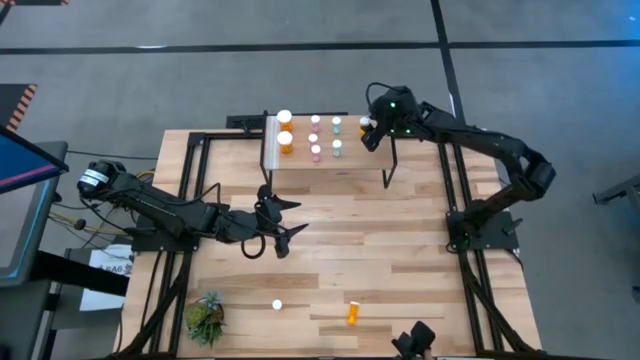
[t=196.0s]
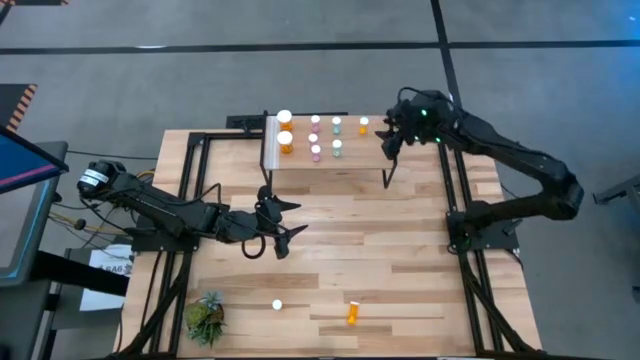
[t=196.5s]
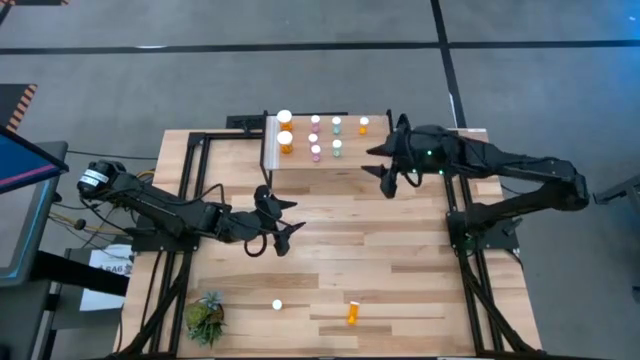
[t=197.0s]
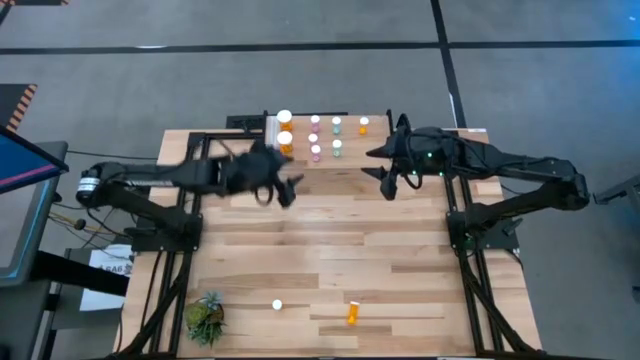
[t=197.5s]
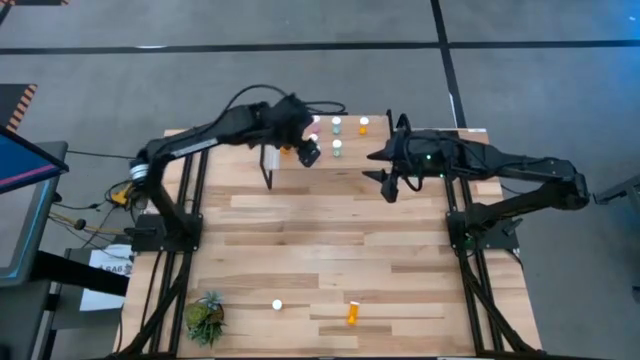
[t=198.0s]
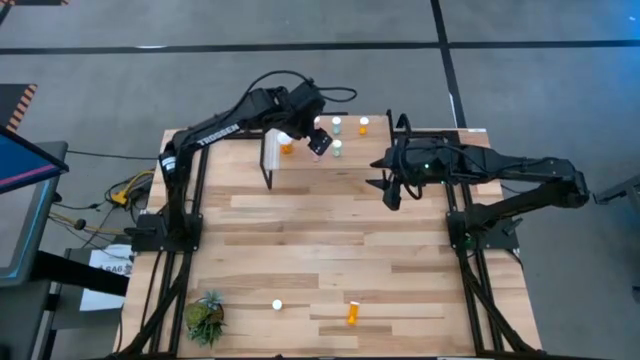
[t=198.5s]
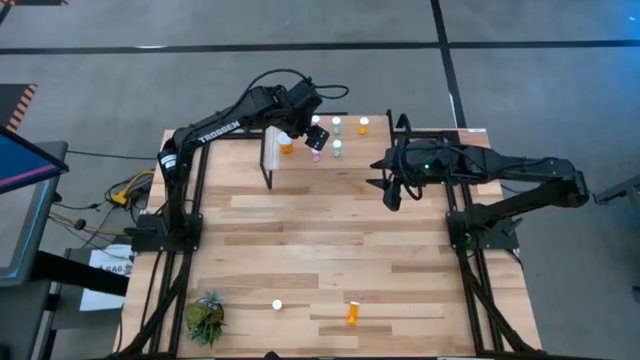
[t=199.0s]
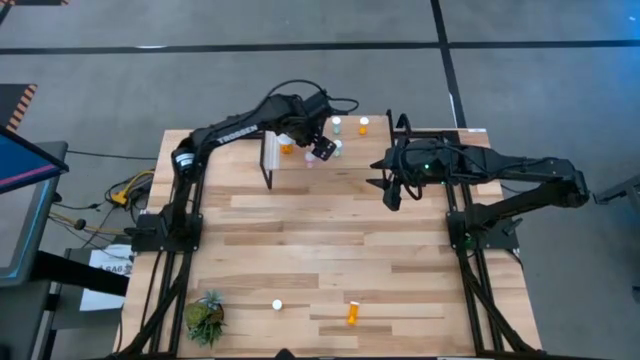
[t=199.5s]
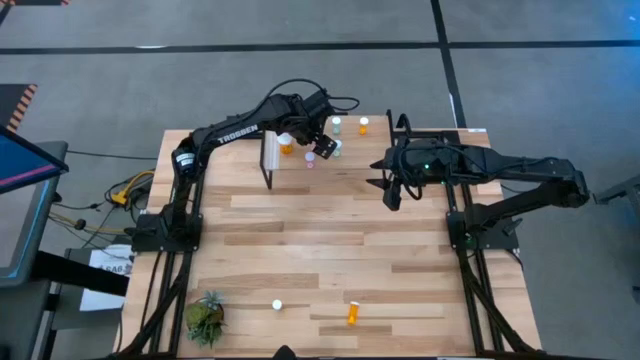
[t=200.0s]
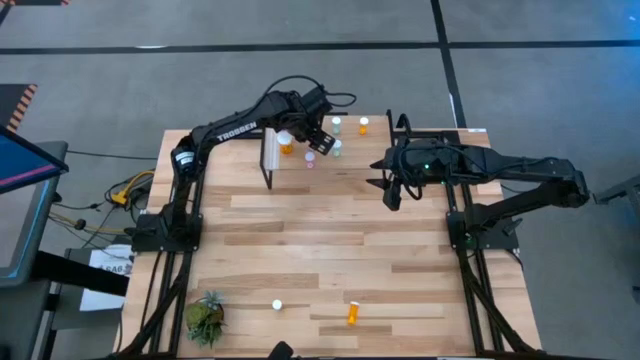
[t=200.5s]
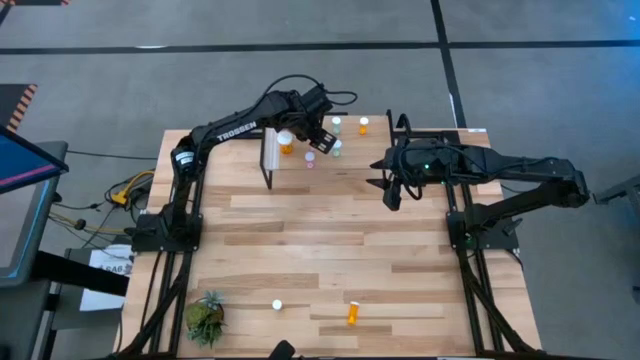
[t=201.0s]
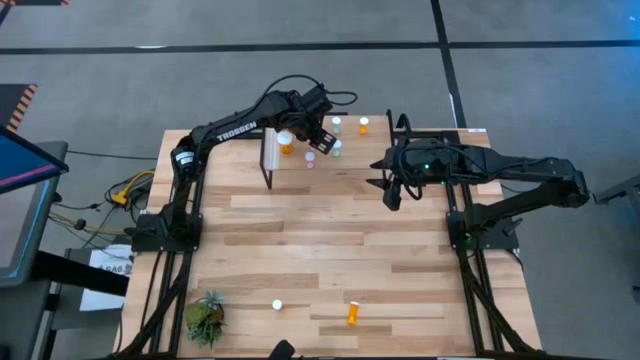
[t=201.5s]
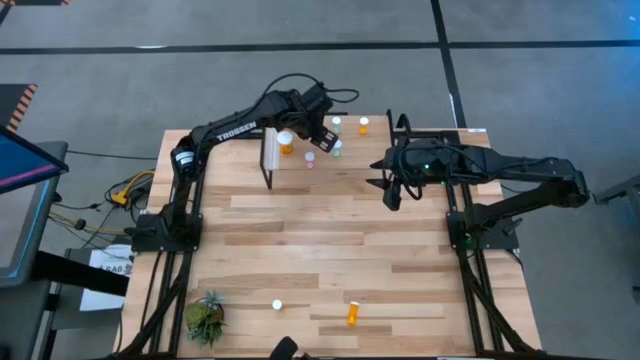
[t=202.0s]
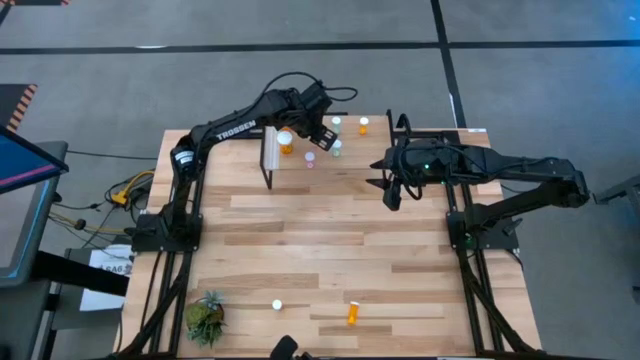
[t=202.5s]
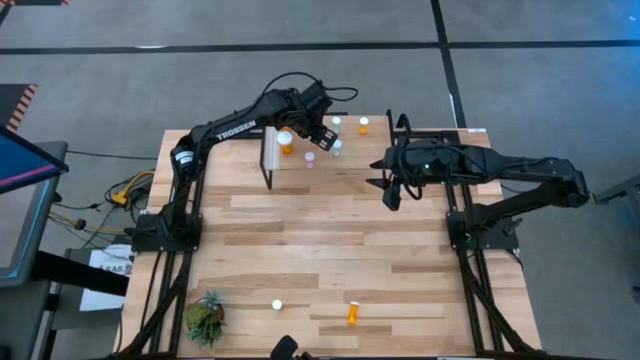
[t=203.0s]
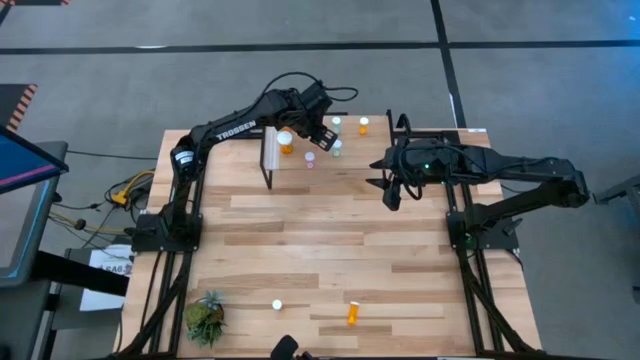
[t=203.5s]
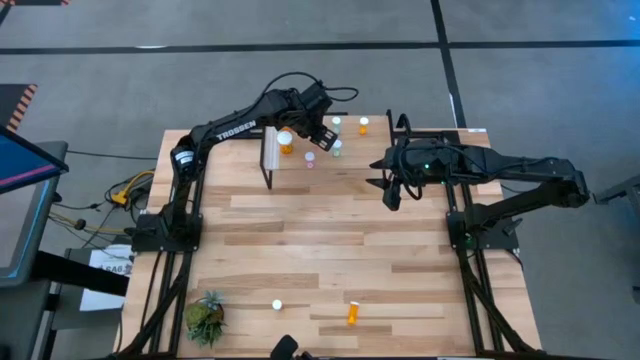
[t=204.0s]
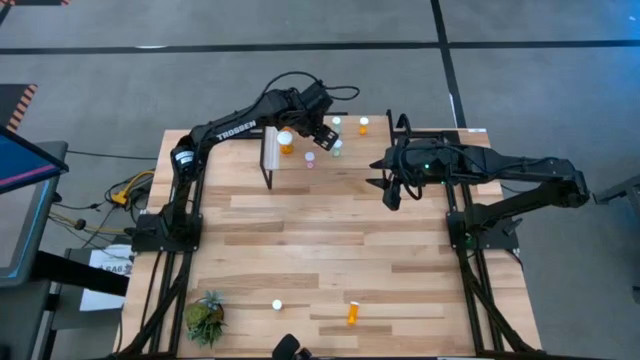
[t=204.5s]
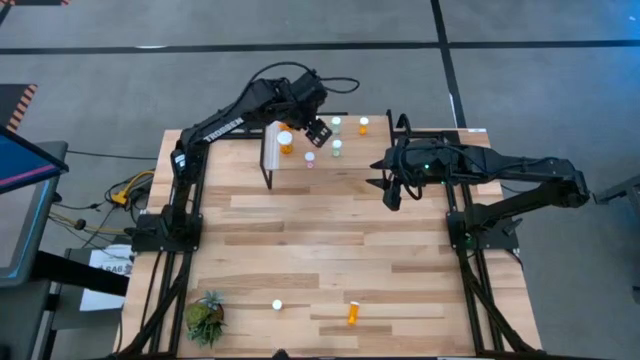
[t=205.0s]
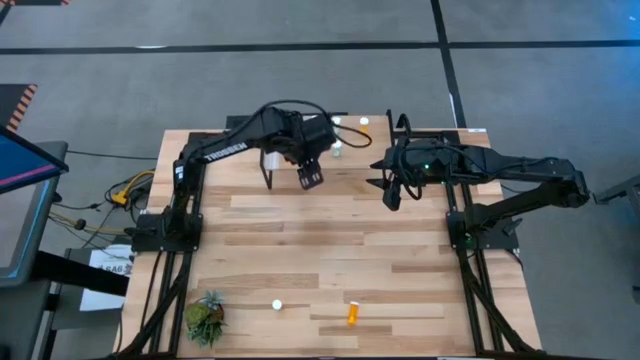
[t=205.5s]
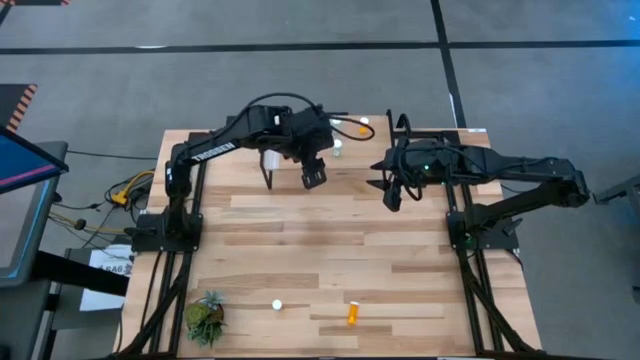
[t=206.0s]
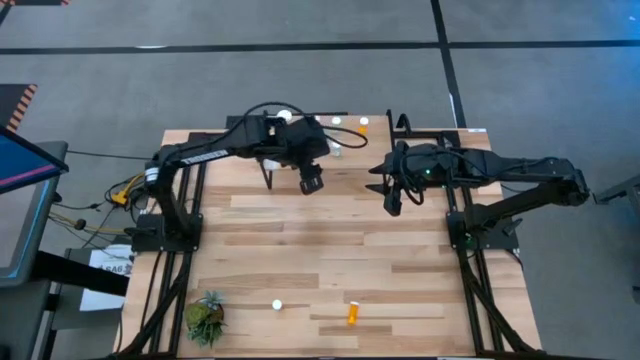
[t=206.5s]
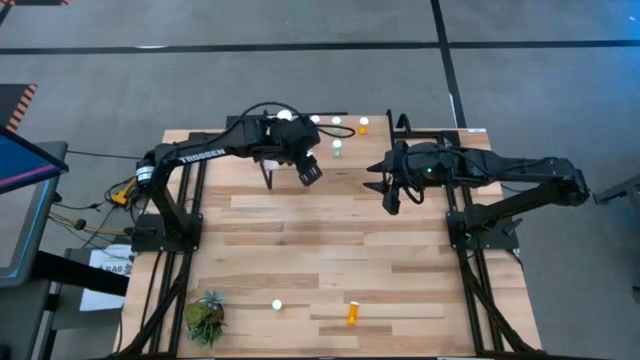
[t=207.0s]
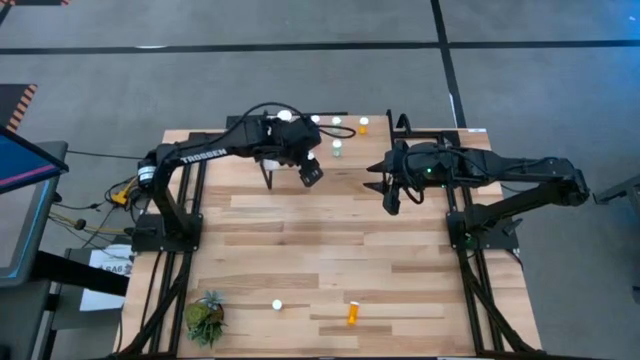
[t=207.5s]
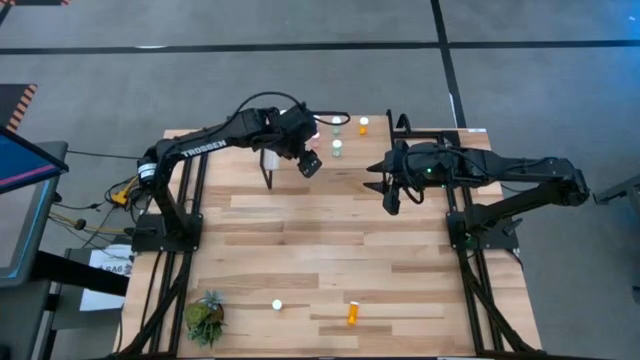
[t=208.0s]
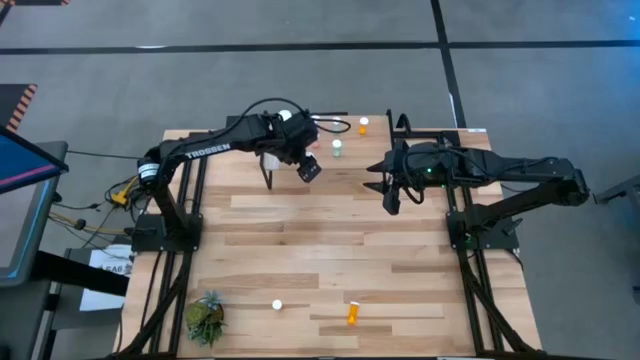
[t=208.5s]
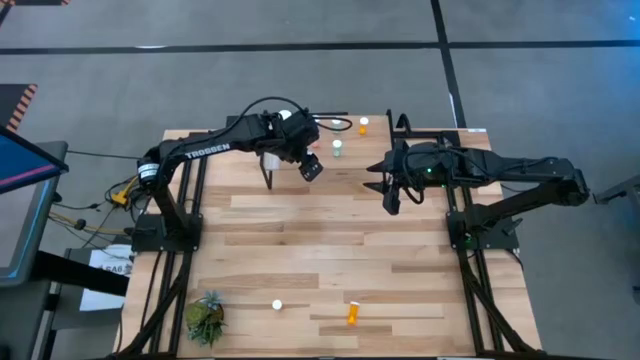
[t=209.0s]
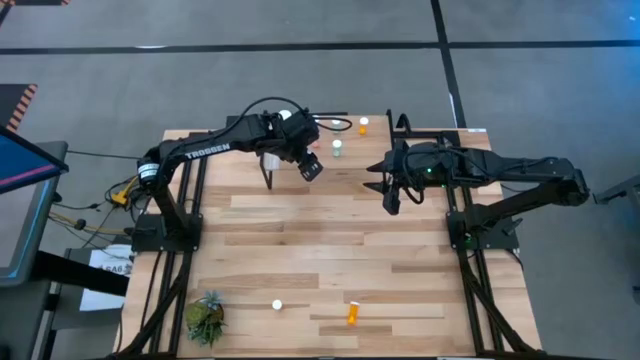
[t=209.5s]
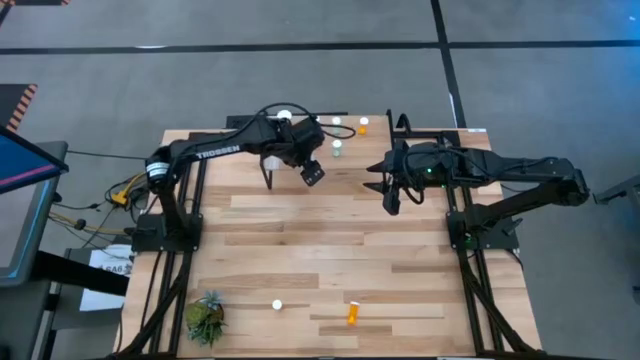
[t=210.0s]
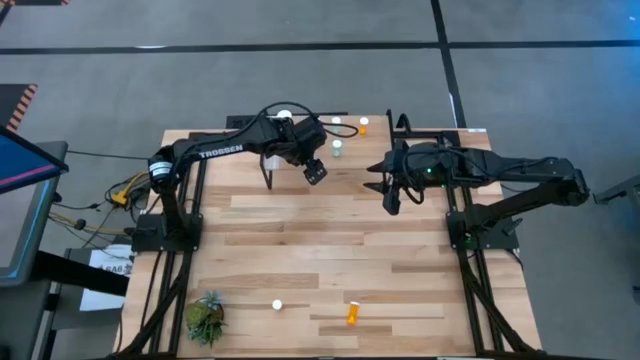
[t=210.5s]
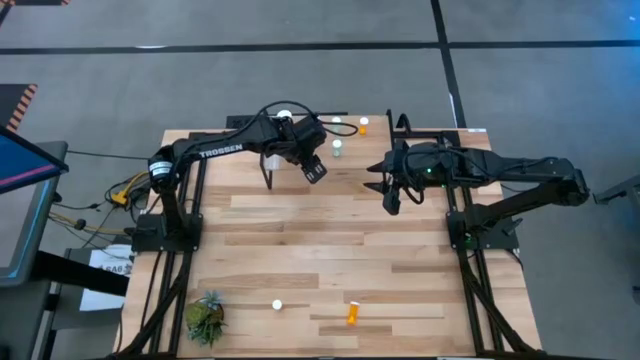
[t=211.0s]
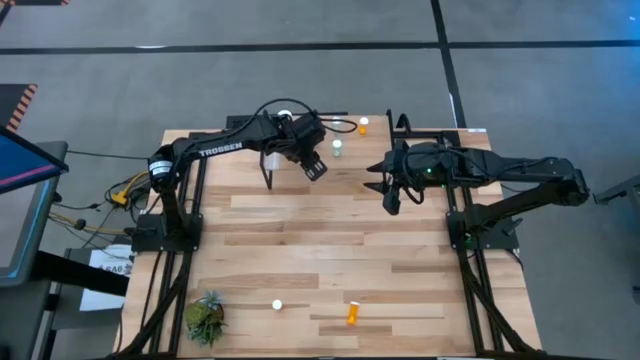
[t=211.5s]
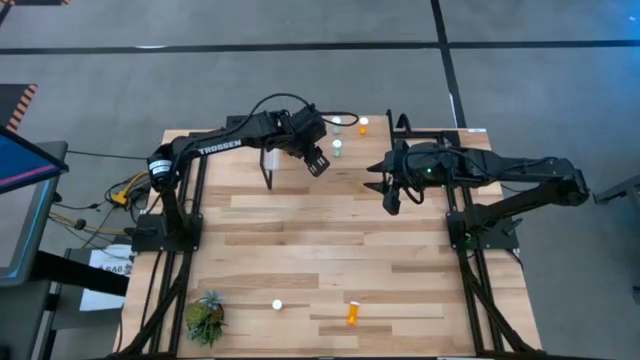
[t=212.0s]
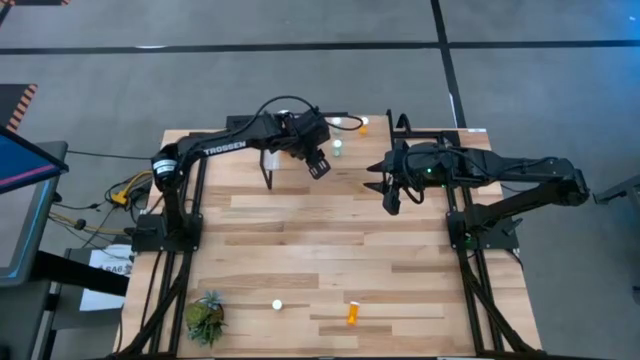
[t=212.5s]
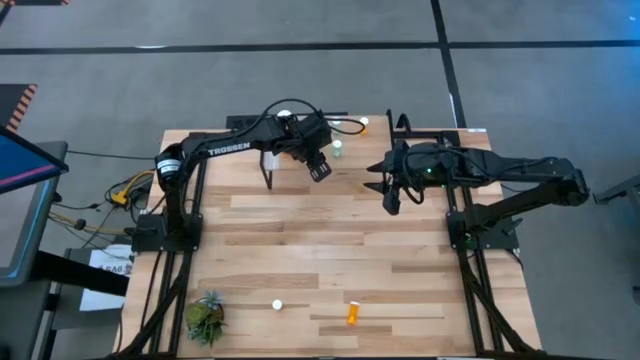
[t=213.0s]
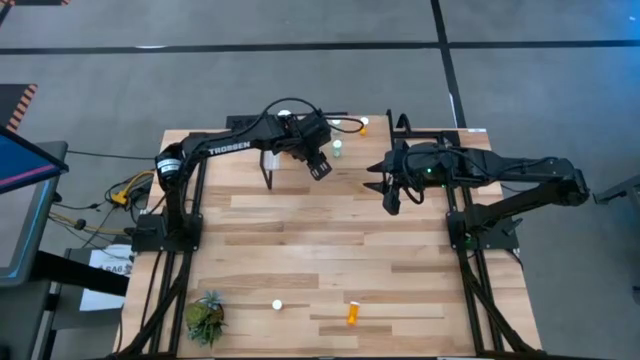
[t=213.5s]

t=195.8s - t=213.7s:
Task: Pick and place medicine bottles onto shelf by color
Adjust the pink pill bottles

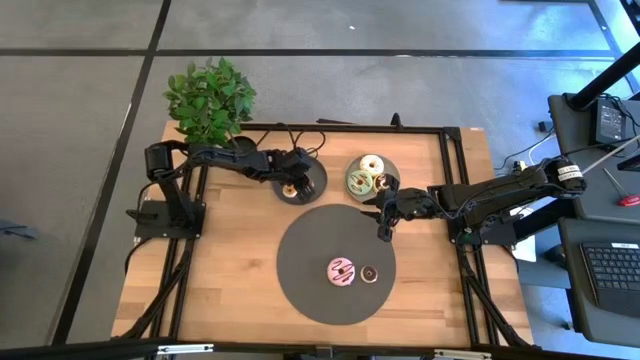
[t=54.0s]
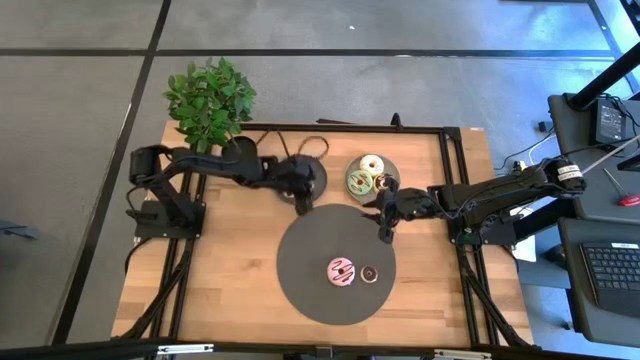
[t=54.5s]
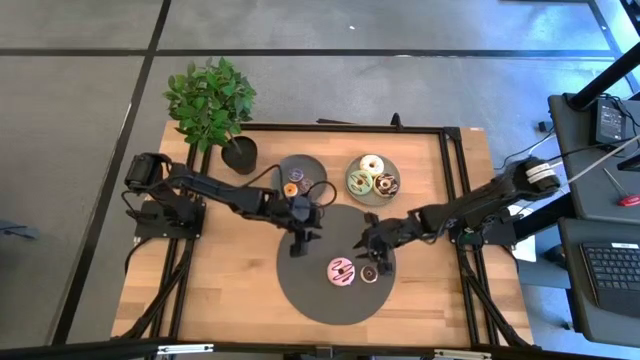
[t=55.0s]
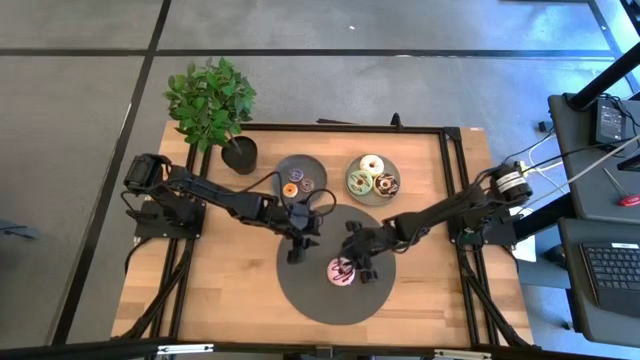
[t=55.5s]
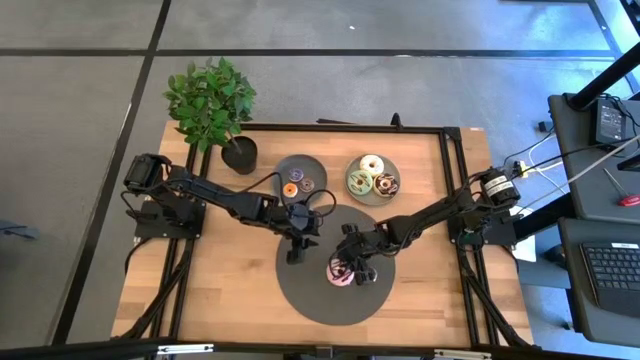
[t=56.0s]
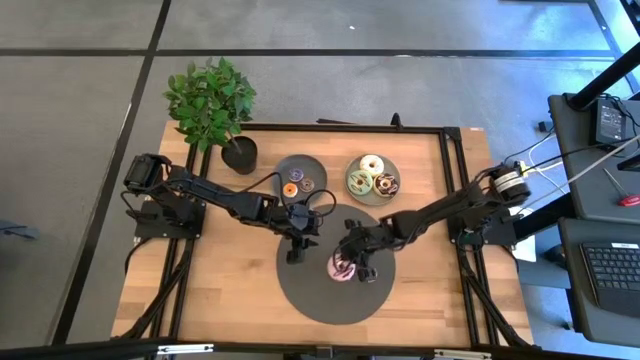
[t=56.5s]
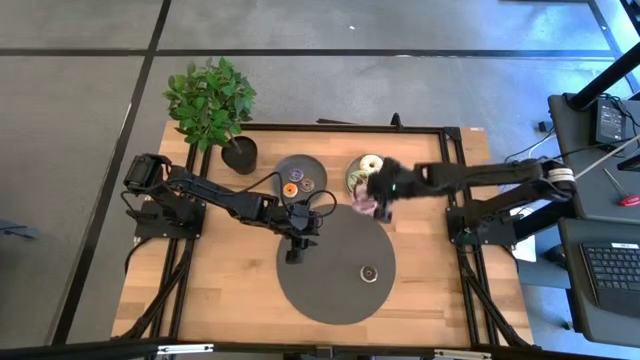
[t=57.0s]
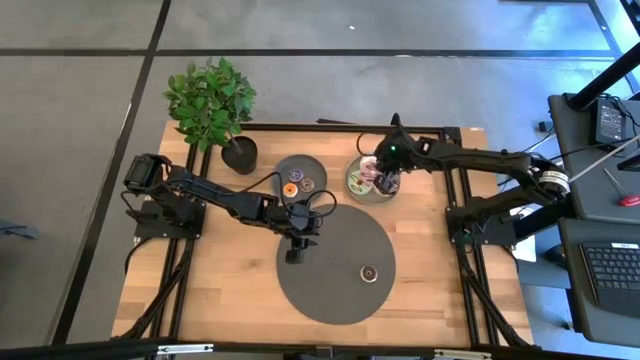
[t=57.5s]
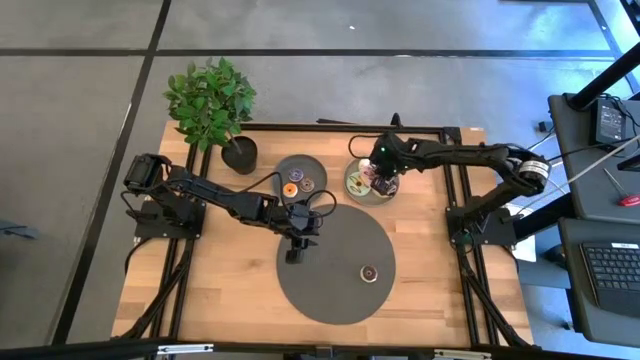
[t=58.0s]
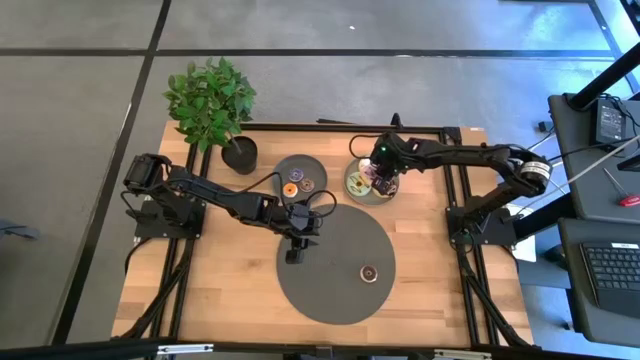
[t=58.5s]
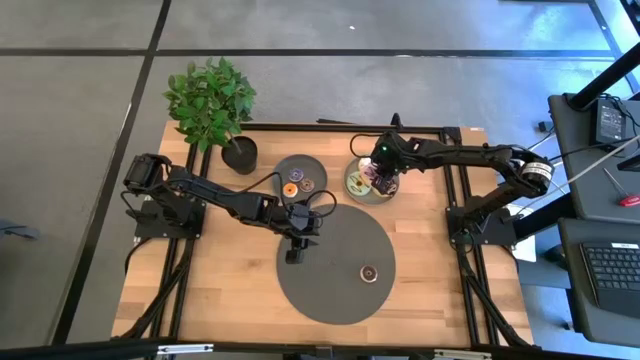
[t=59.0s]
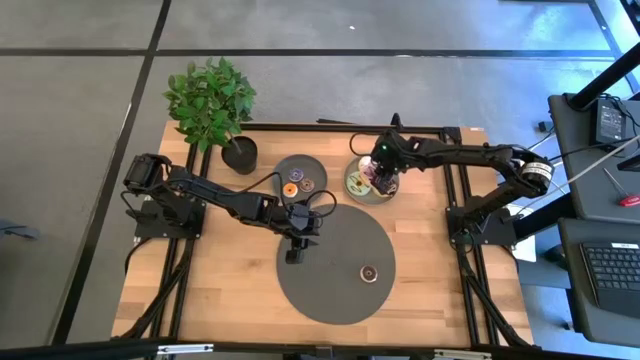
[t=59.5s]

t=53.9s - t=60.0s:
Task: Pick & Place donuts
Put the large pink donut on the light gray plate
